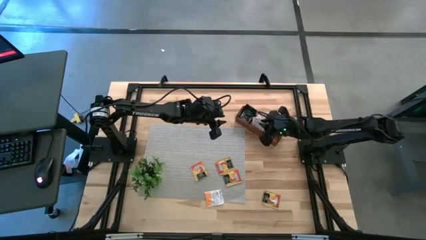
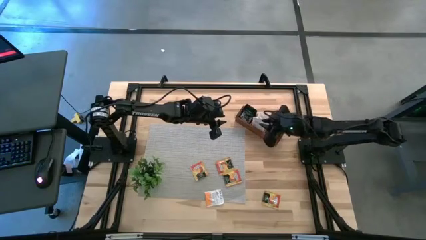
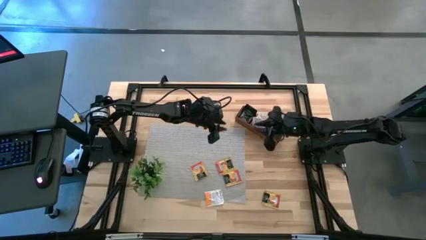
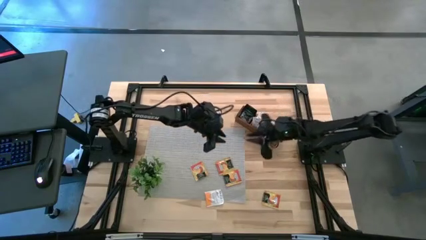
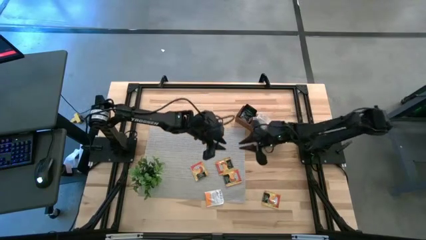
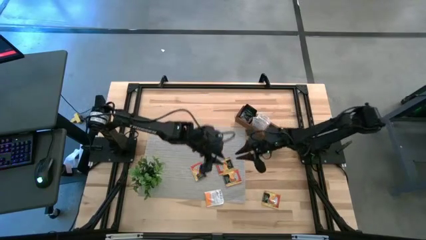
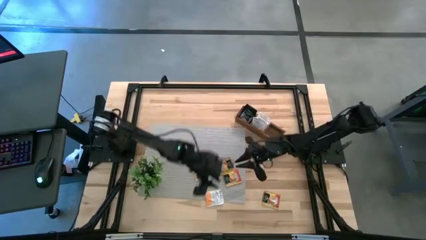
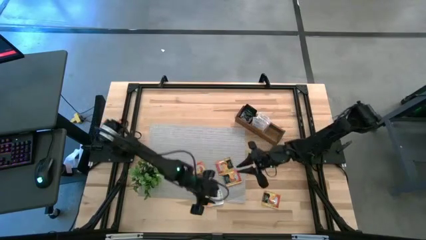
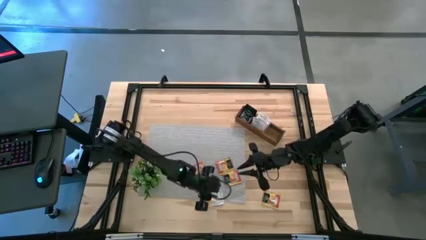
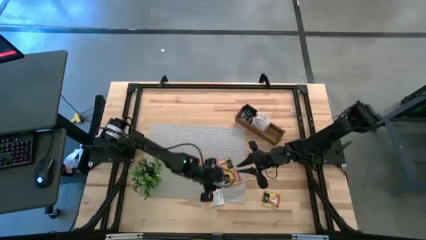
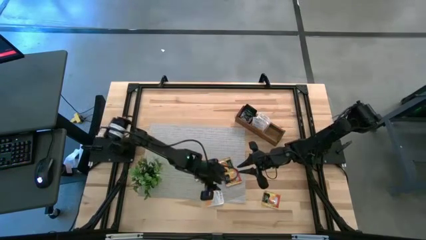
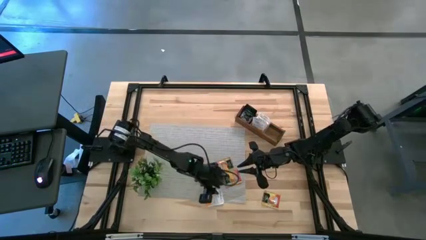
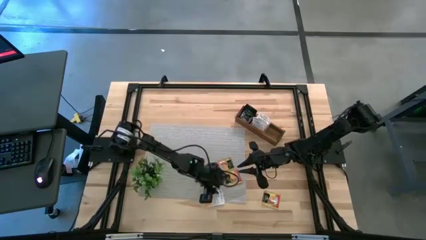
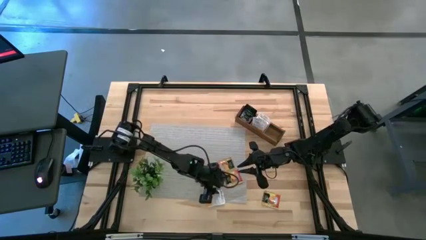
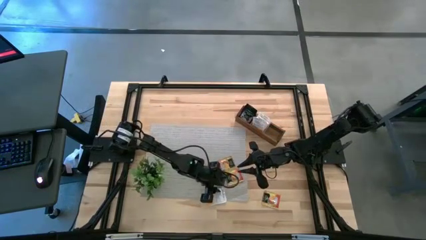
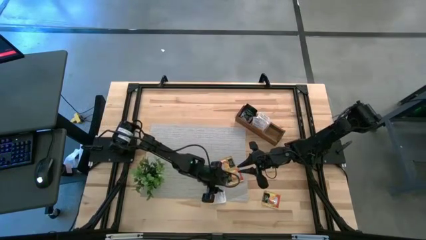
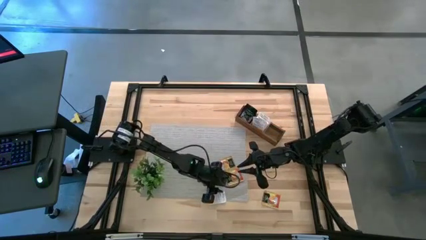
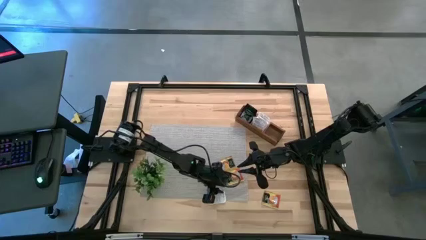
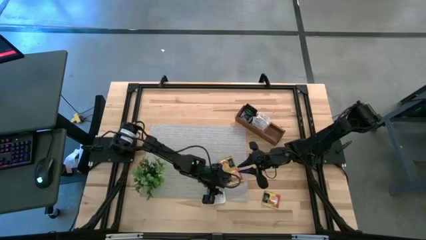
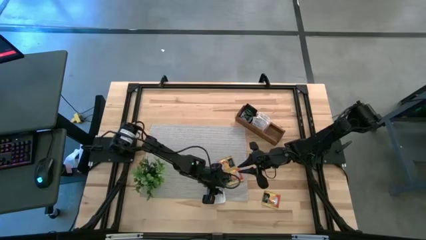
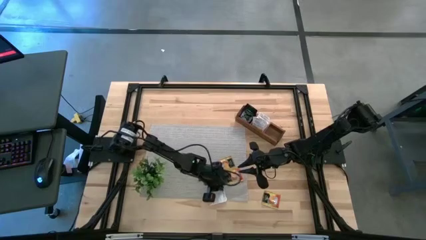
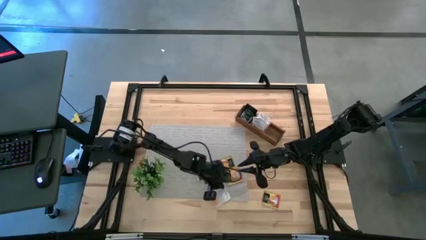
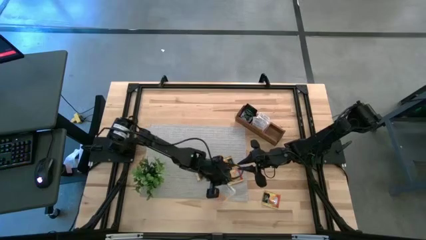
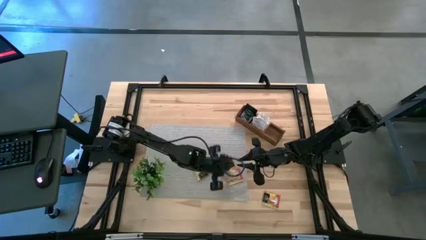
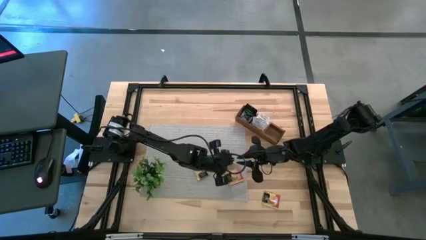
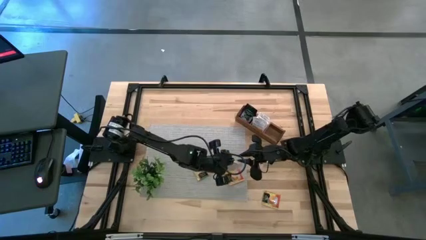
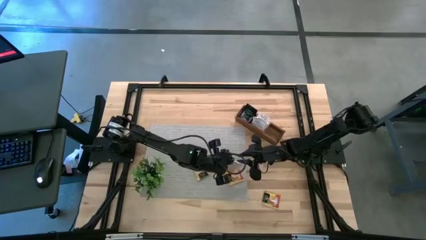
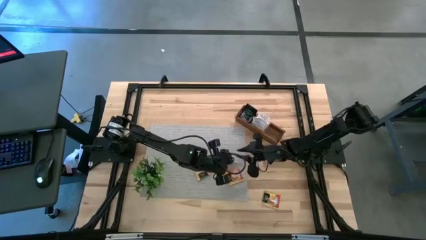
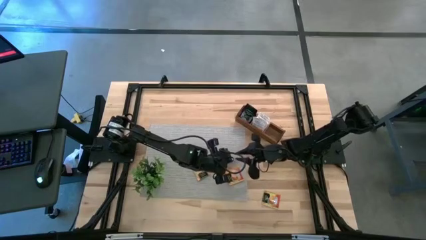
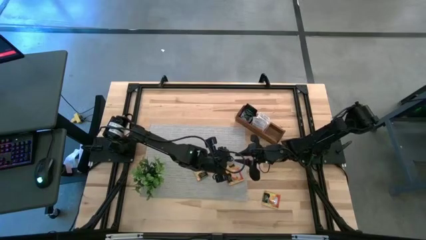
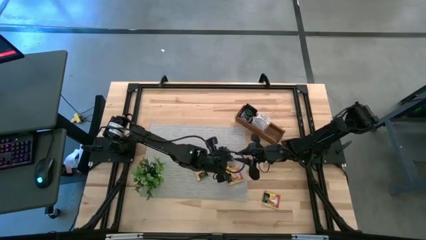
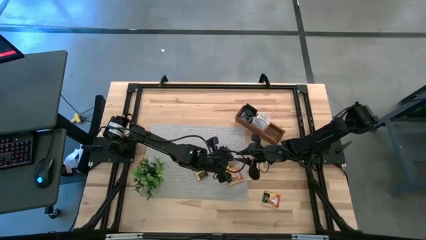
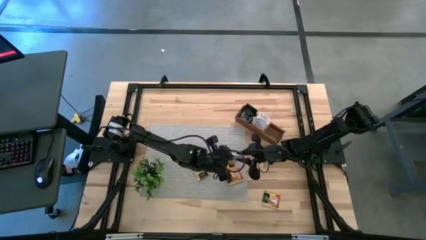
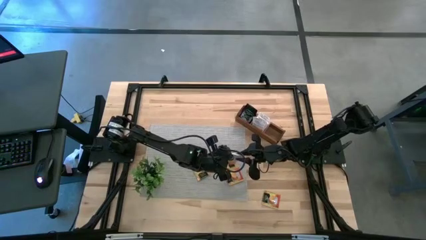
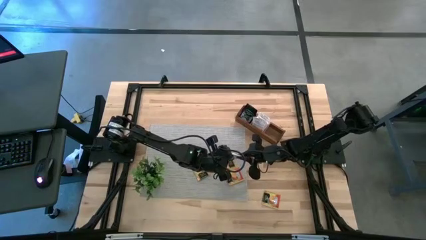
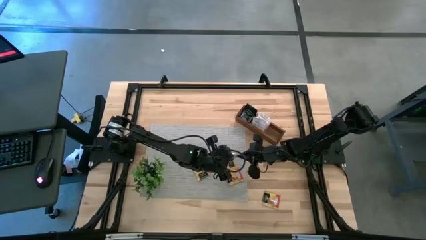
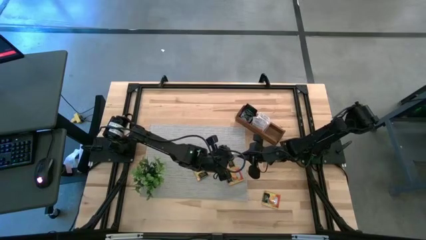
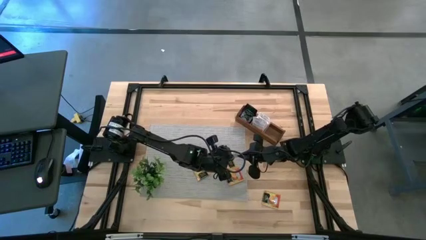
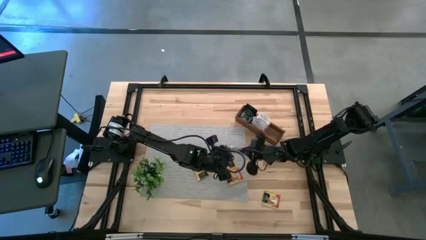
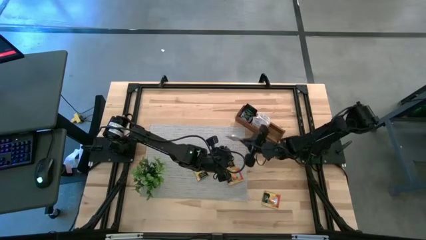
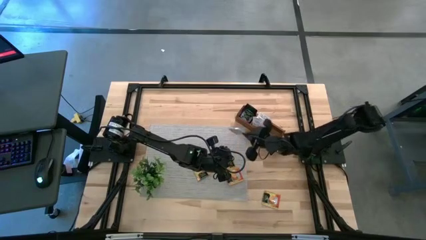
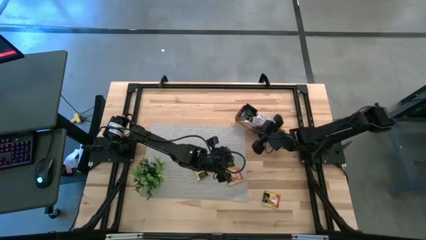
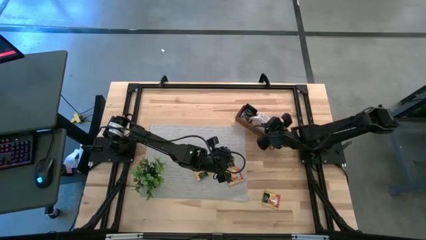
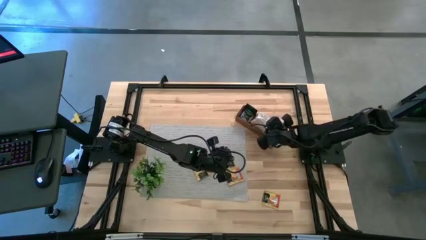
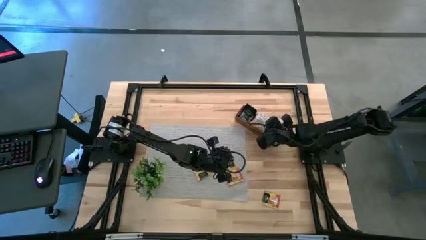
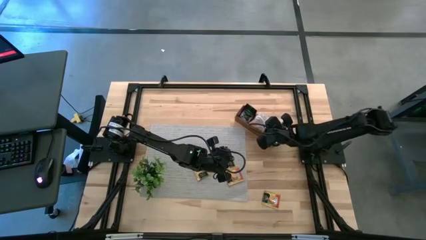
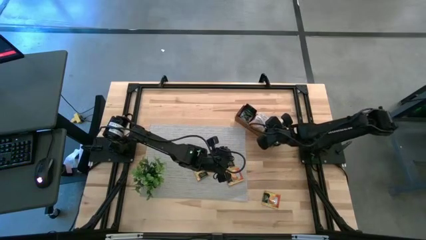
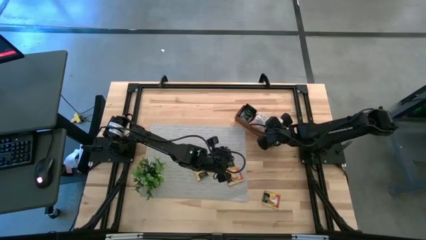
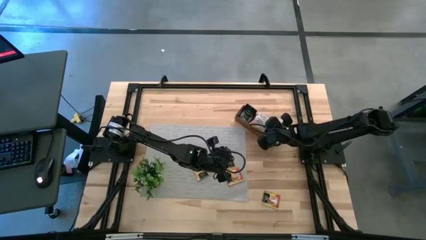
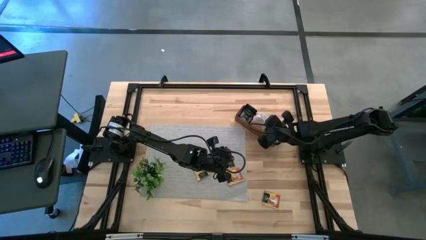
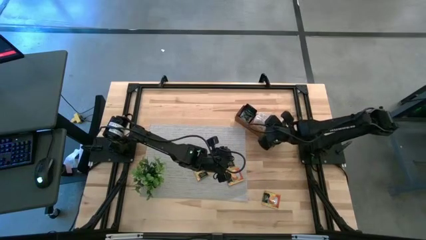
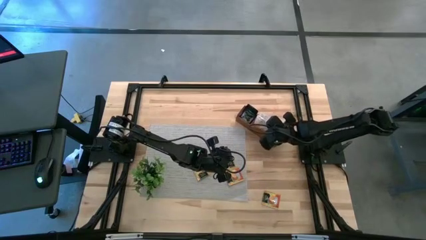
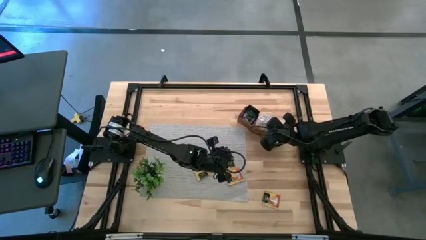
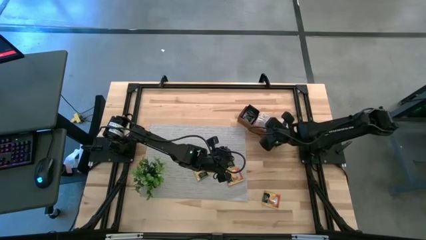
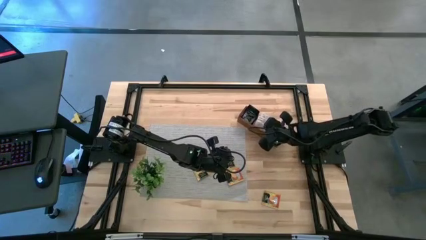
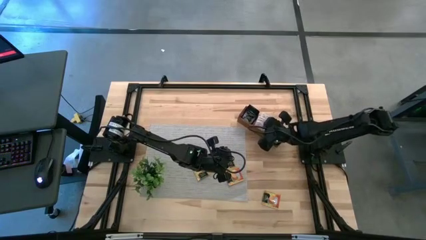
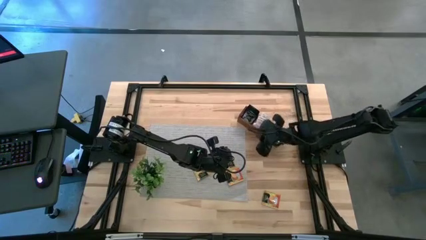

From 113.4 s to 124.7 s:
Task: Pick & Place Tea
Put the orange tea bag into the middle section of the wooden organizer

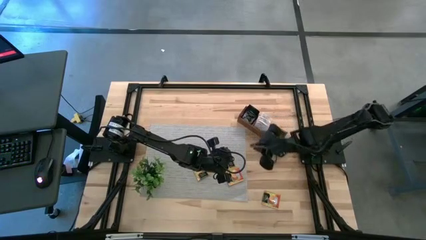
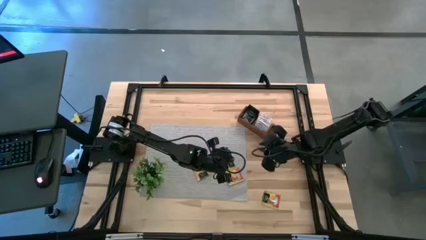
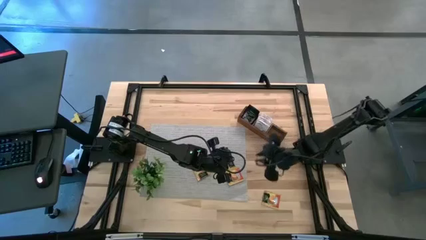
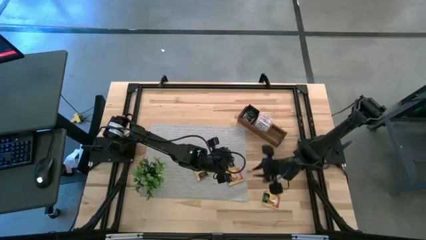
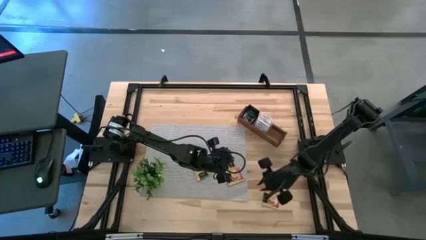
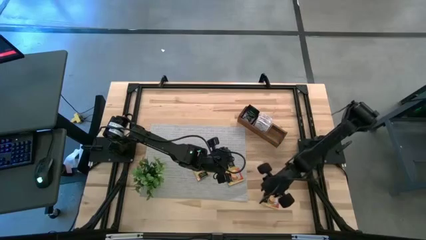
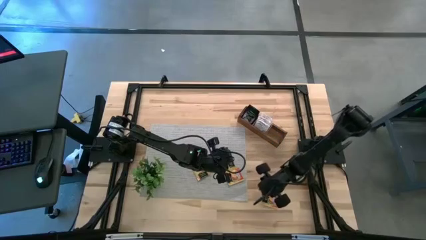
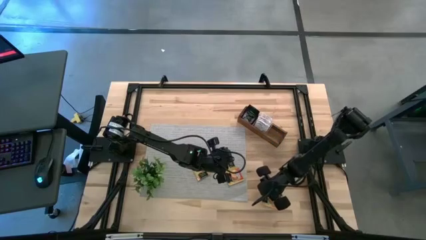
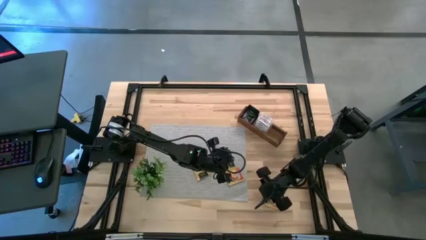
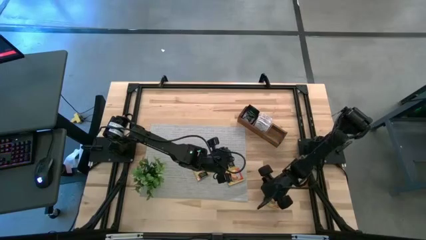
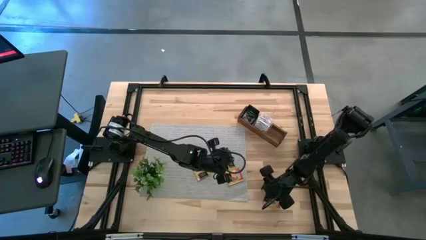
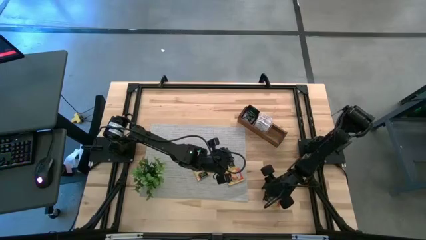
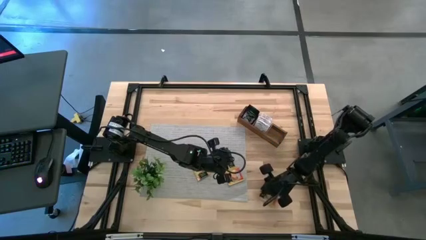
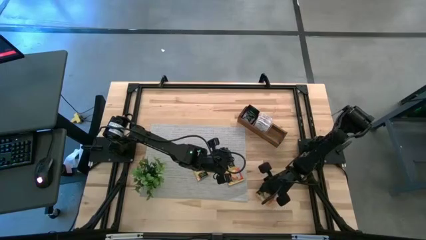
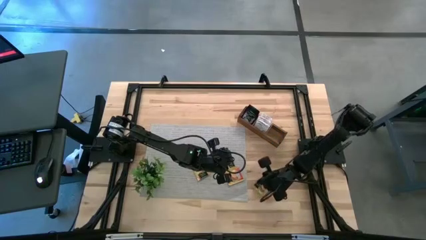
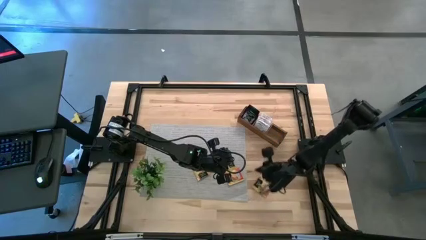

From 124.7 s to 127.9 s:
Put the yellow tea bag into the right section of the wooden organizer
